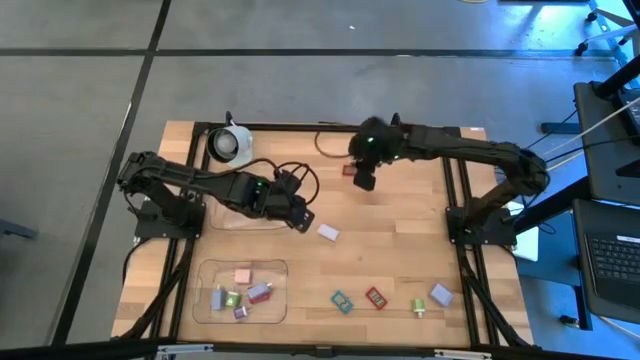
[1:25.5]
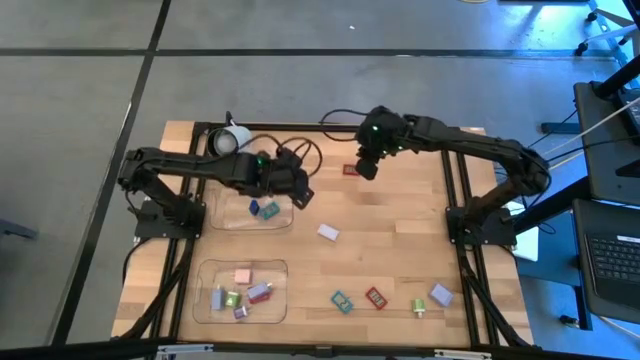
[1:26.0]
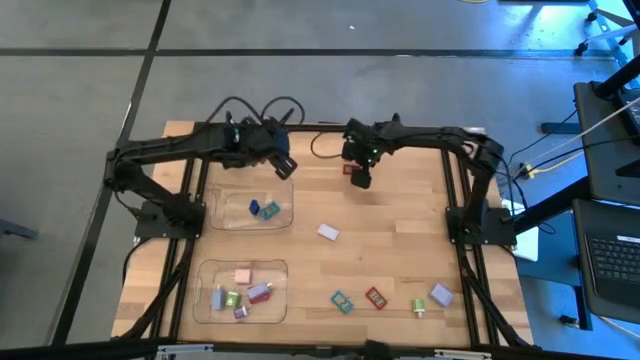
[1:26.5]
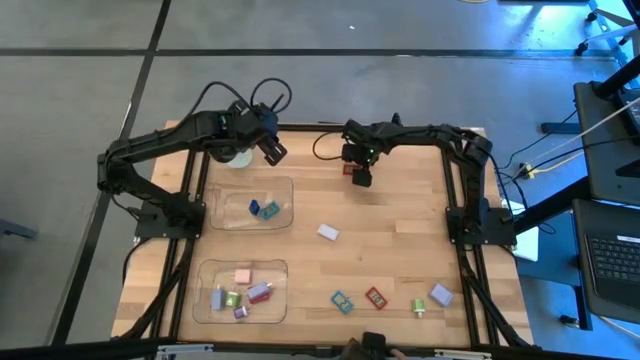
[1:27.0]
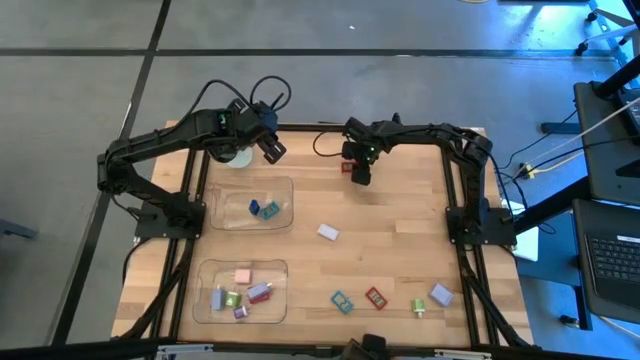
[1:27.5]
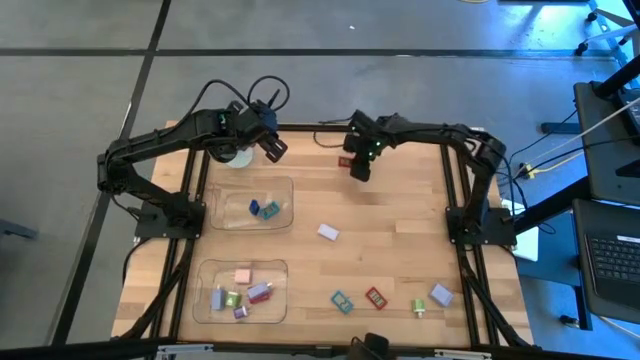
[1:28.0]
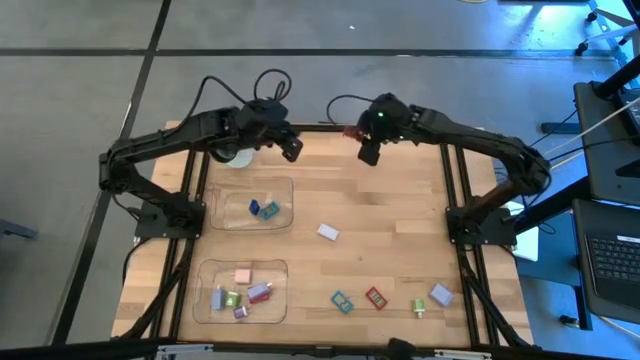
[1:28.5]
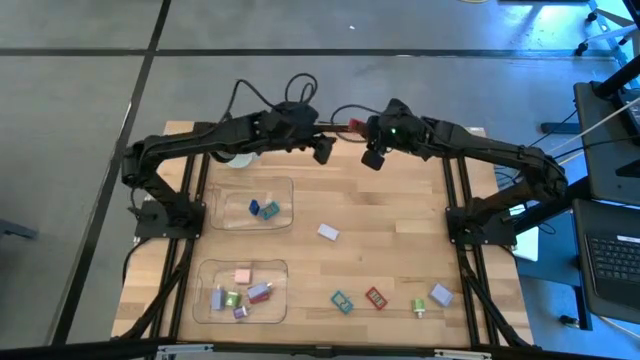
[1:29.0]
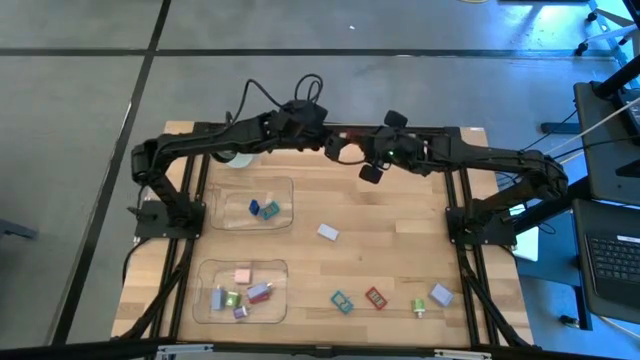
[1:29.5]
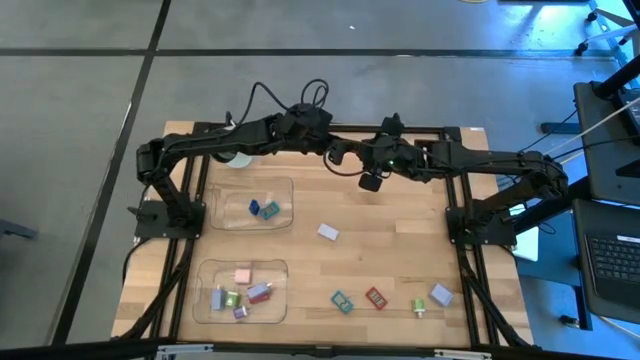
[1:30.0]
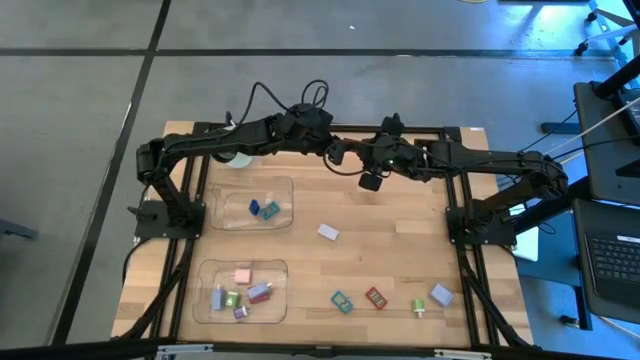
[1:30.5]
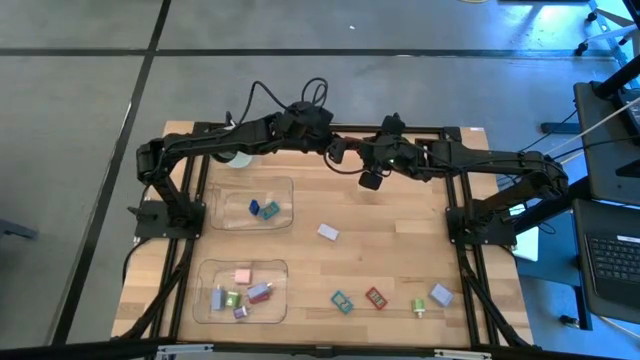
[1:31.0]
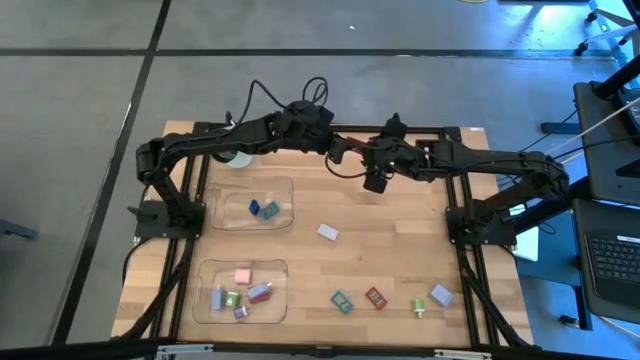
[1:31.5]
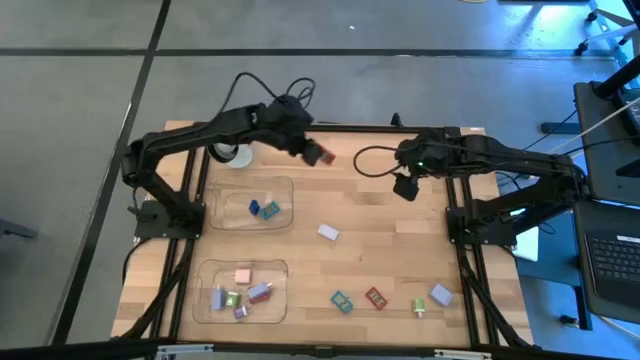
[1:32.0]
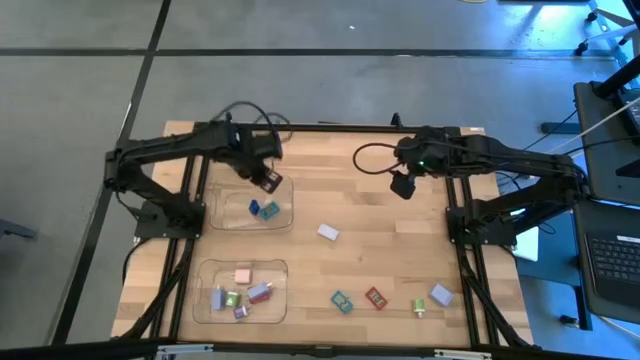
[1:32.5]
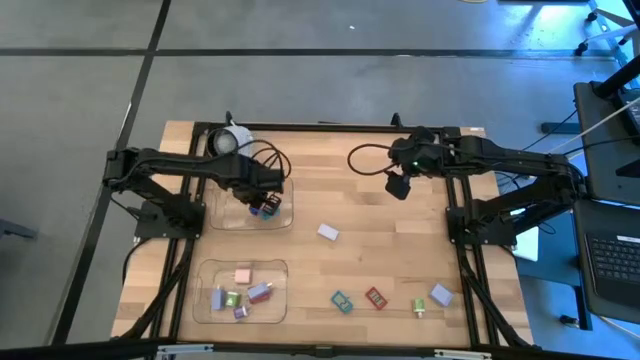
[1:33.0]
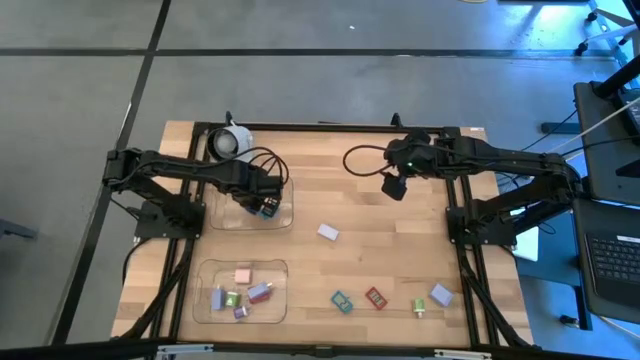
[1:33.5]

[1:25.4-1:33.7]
Task: Pick & Place Office items
Put the top red timer into the top transparent bin

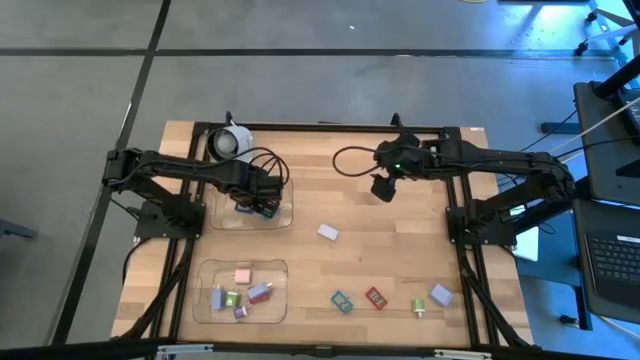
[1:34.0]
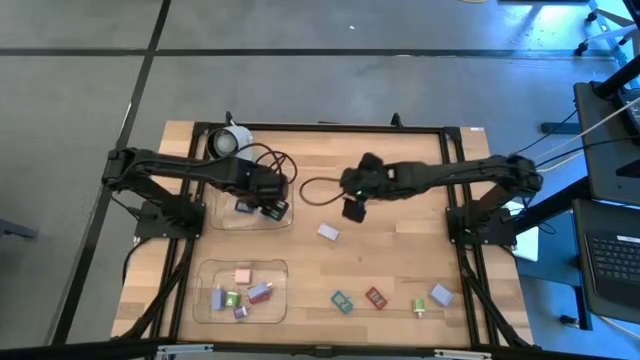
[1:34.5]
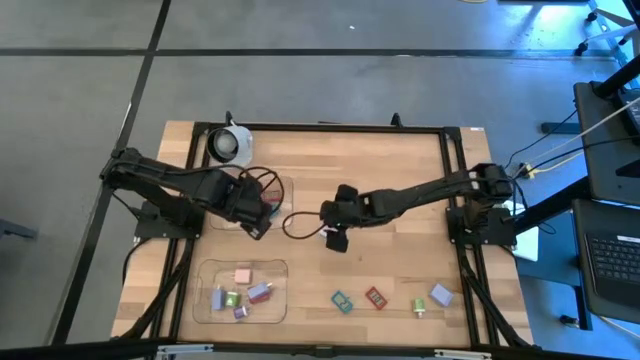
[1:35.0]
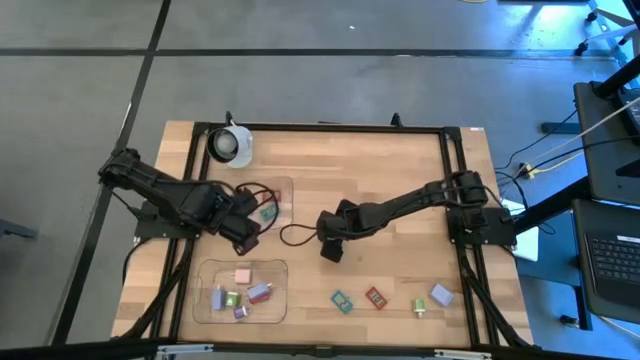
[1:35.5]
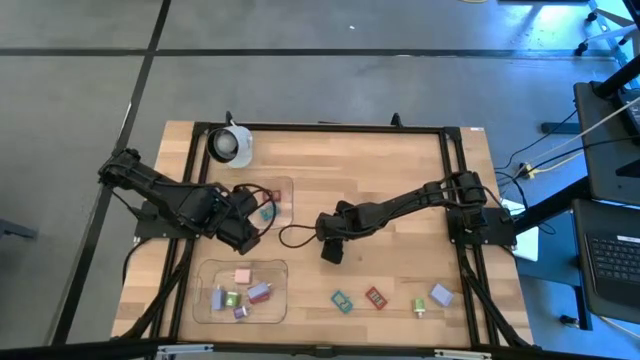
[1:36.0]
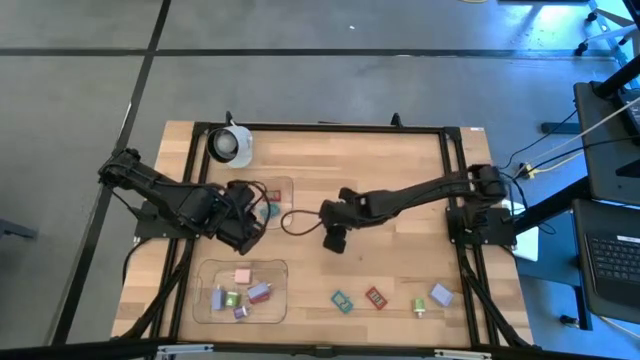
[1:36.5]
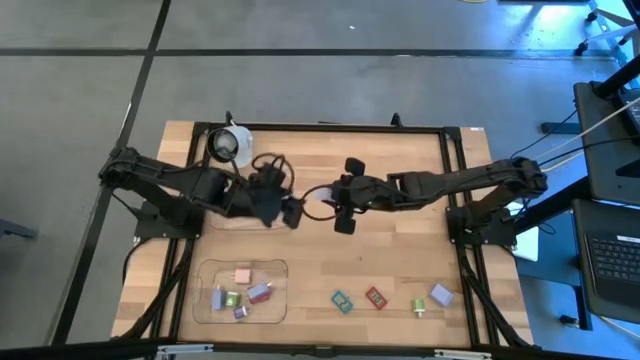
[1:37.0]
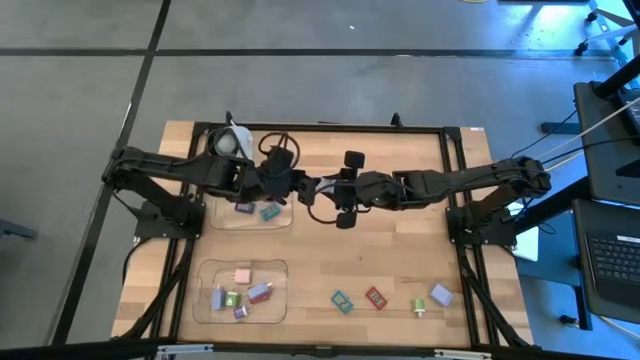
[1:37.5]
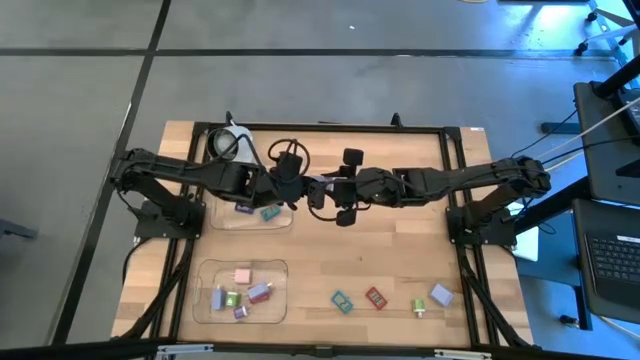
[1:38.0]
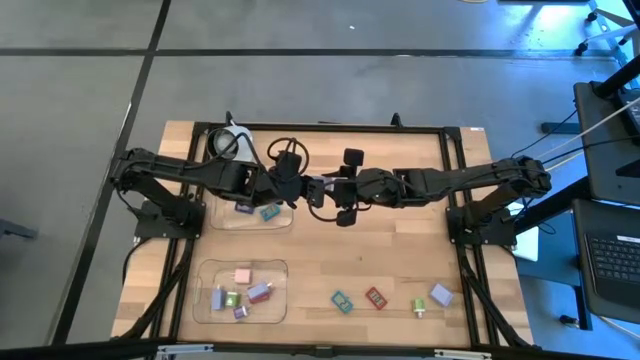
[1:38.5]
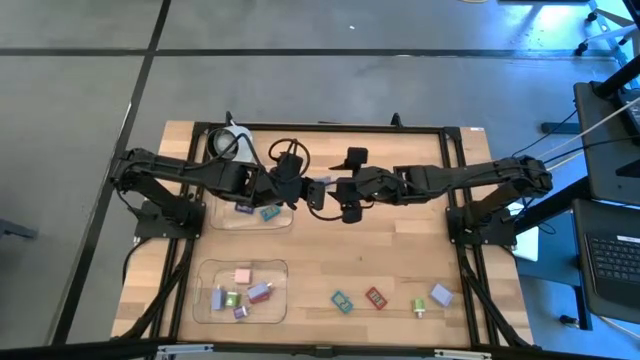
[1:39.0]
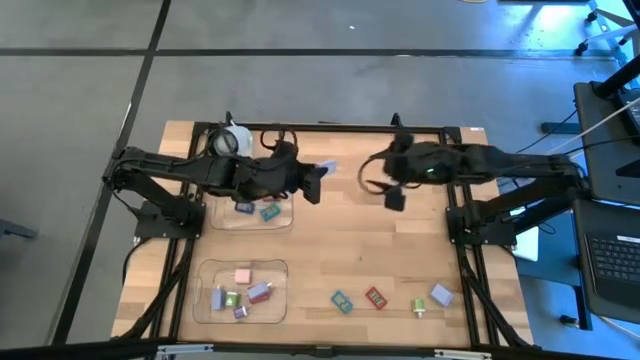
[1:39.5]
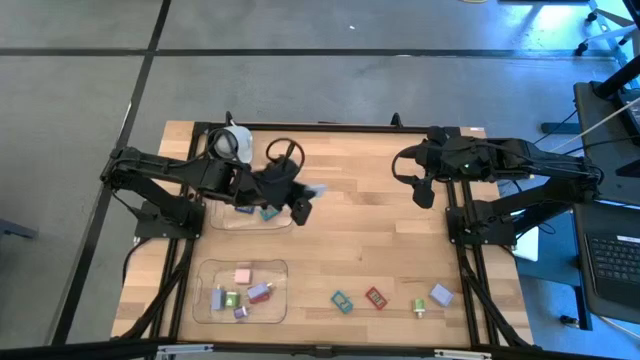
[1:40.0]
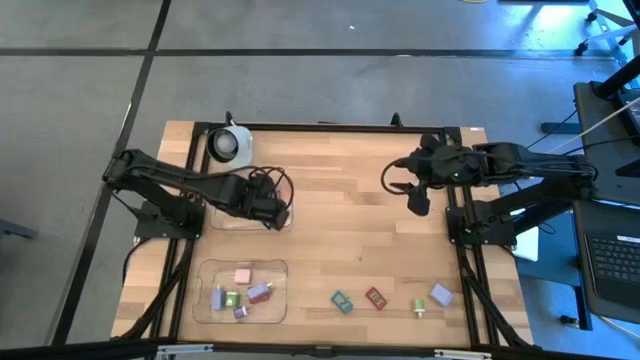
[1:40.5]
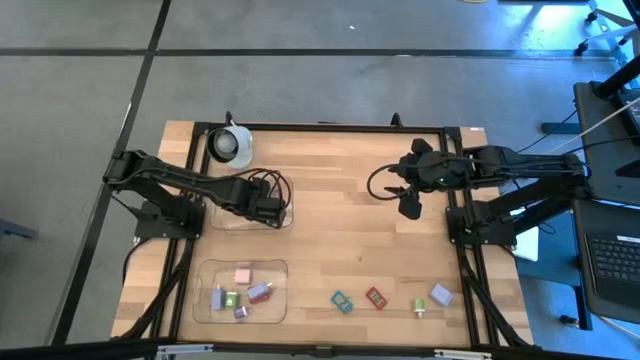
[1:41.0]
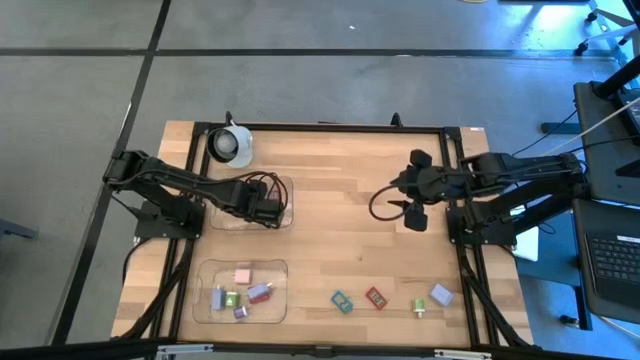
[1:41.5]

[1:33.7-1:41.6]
Put the white timer into the top transparent bin

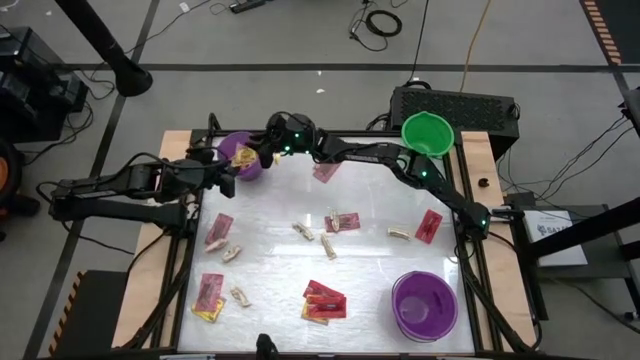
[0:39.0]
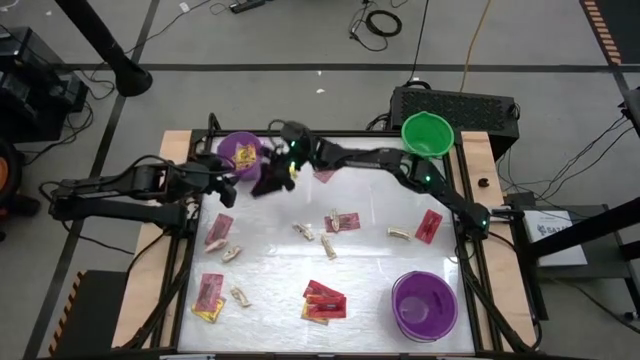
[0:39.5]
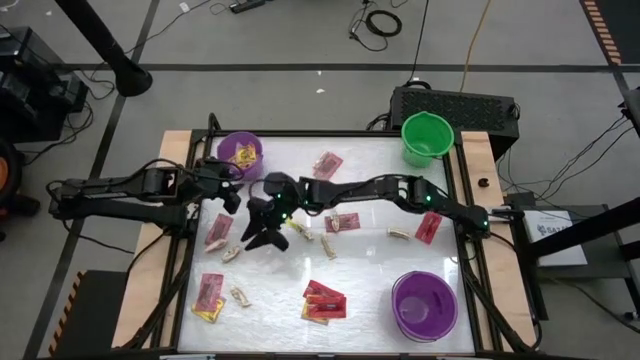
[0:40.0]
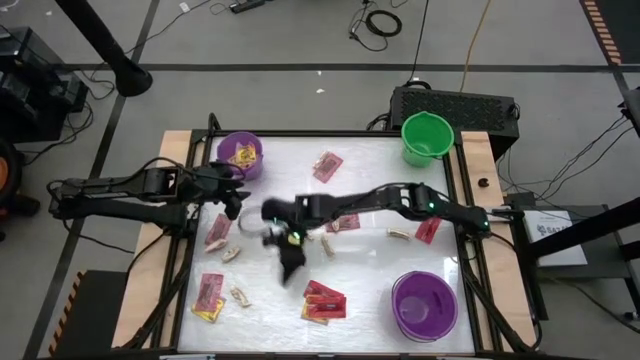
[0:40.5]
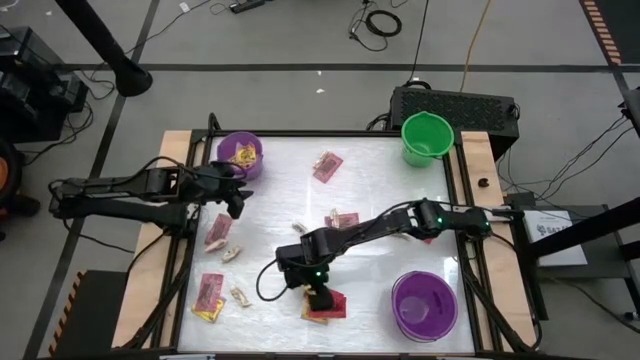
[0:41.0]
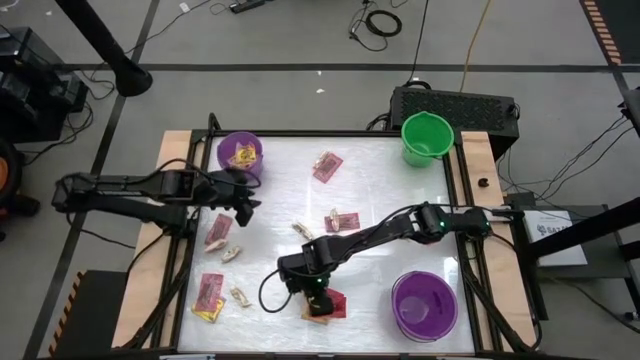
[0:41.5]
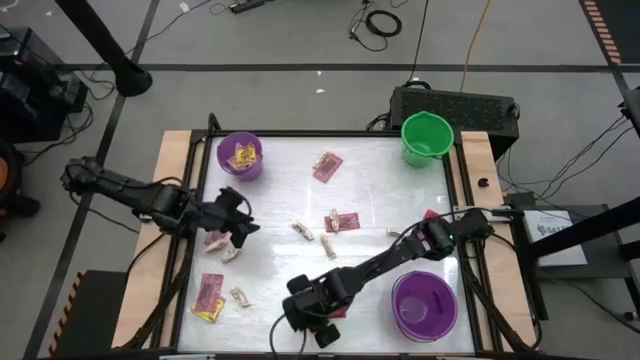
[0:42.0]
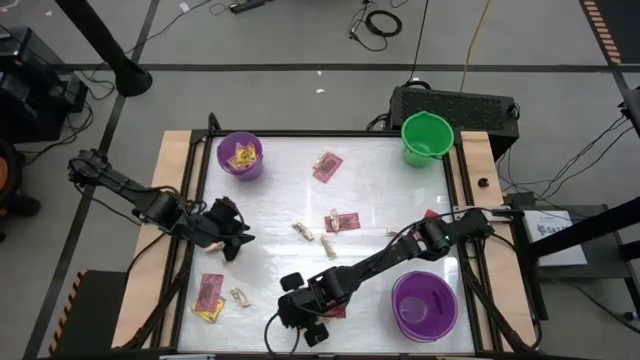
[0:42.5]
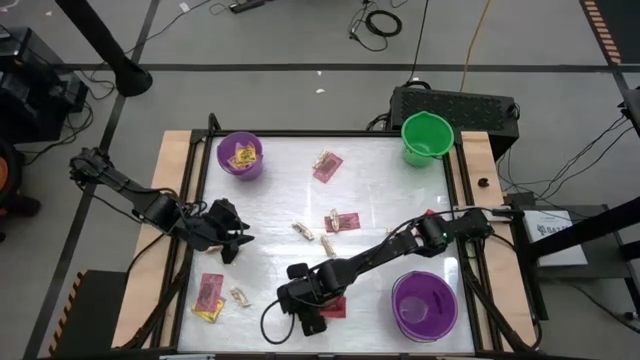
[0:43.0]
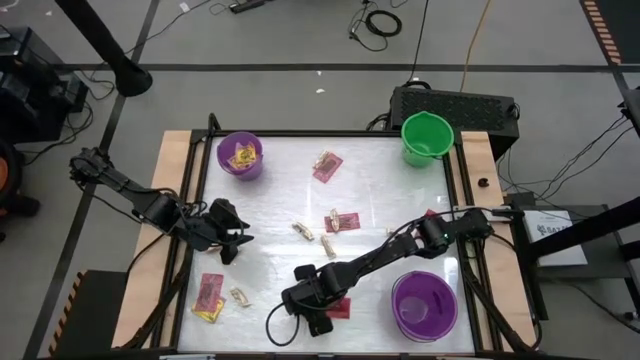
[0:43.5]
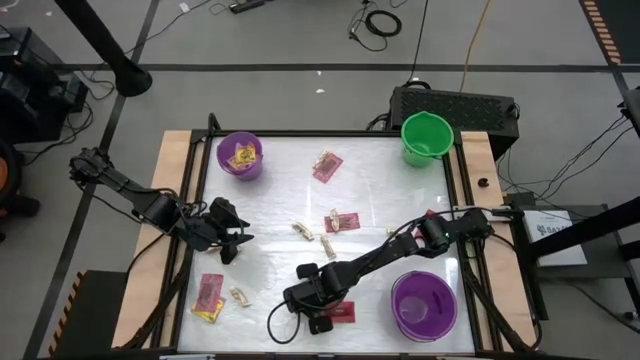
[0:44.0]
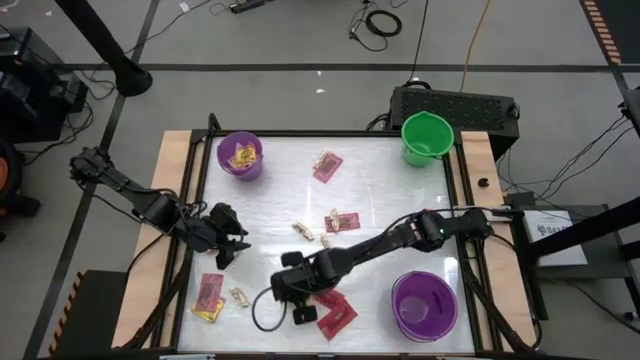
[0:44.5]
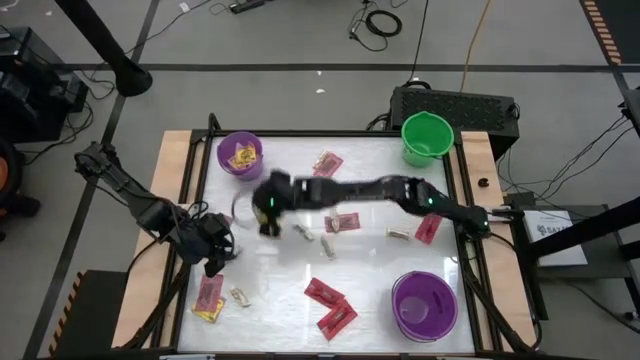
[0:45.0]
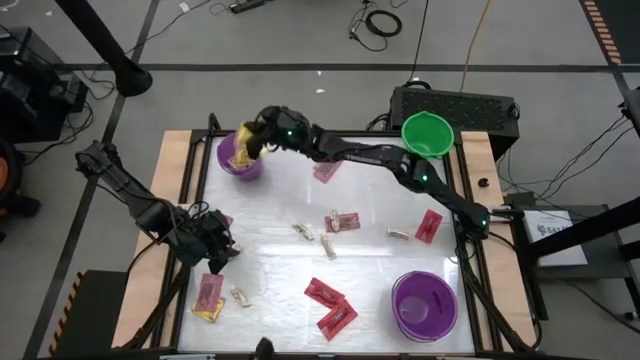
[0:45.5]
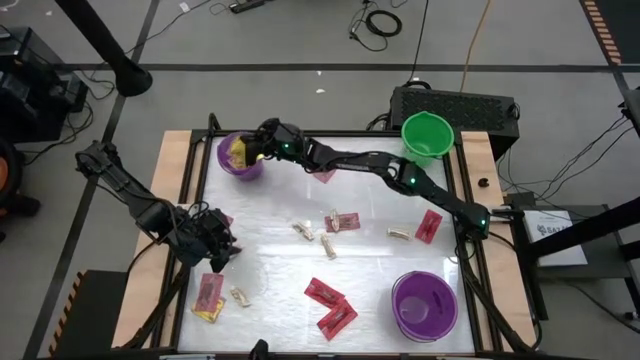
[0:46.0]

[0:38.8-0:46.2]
Task: Sort candy by brand, put in halloween buckets
Put the yellow candy into the top violet bucket
